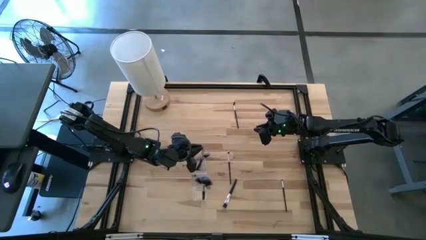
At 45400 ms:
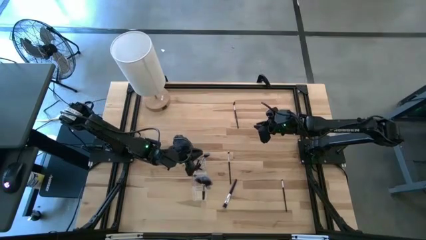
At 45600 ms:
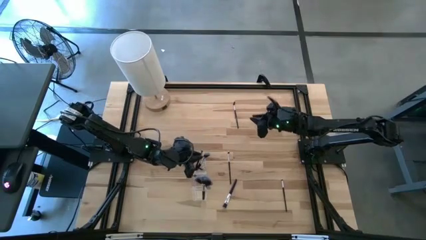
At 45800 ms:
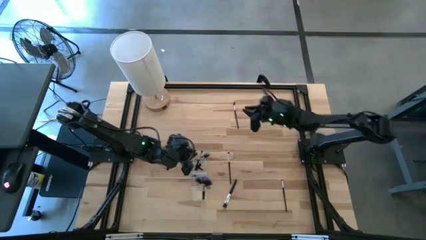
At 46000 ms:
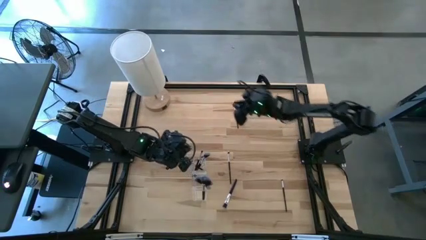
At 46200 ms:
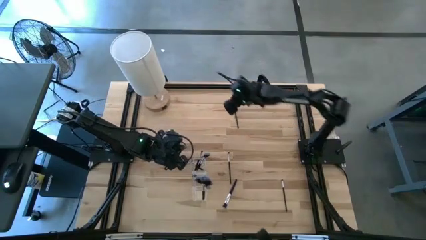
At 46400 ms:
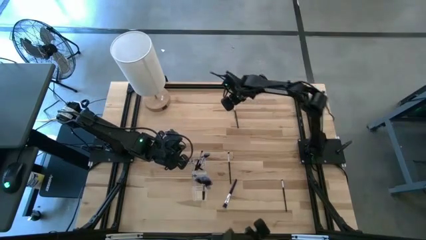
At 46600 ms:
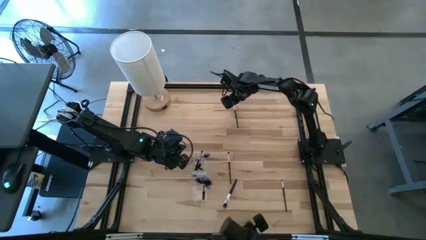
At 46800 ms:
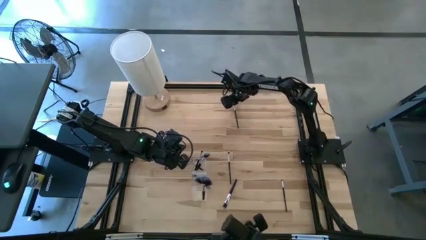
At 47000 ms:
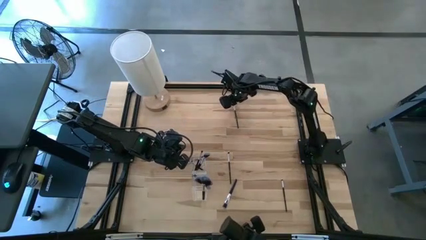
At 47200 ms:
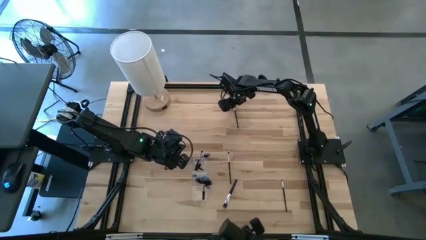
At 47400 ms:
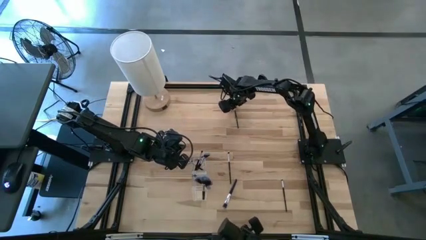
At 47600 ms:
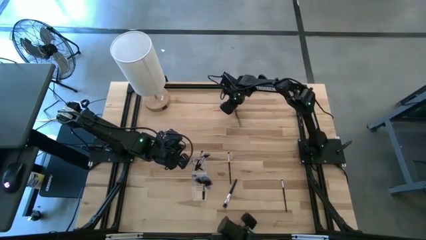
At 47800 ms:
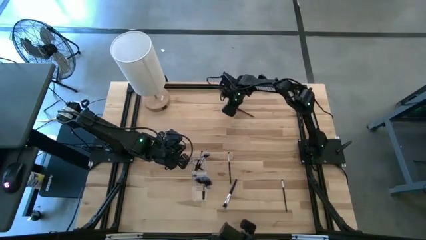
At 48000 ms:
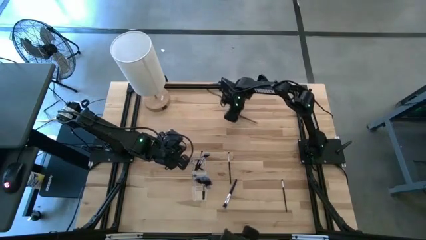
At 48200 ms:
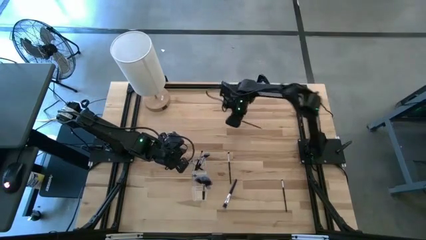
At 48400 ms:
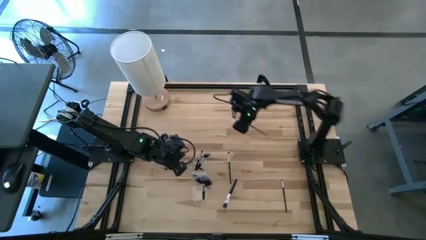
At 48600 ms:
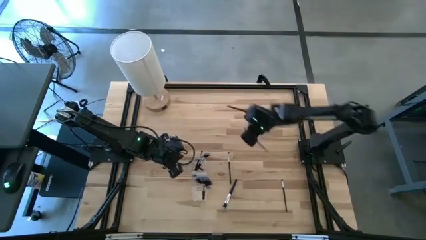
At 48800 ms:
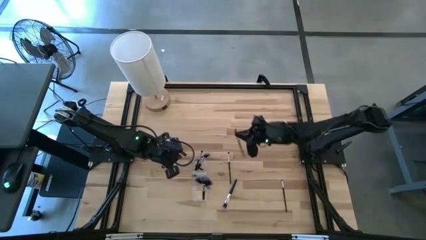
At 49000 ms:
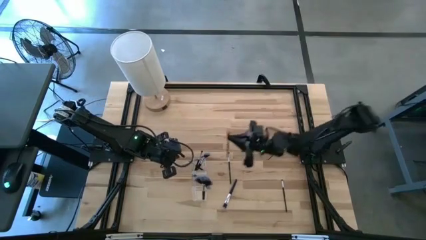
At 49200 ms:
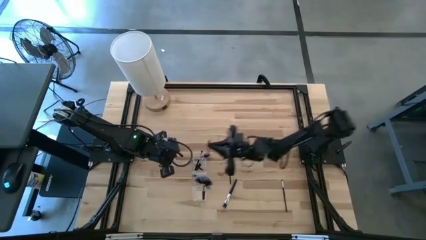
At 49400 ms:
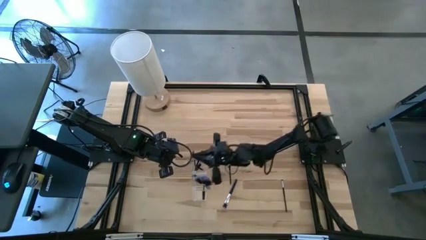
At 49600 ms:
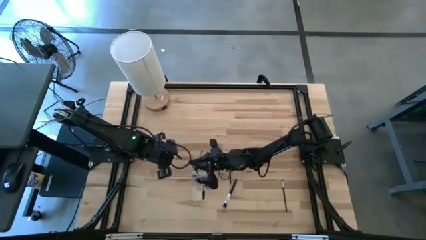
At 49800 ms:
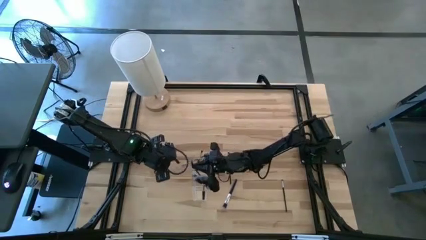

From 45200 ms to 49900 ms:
Task: Put items in baskets/containers
Put the lash brush into the transparent organizer

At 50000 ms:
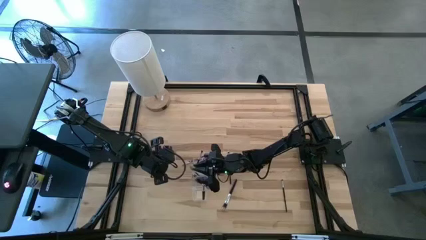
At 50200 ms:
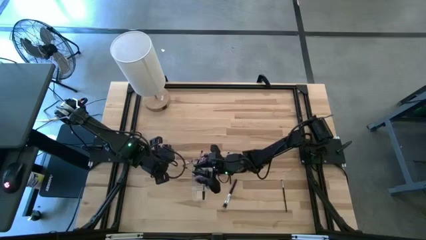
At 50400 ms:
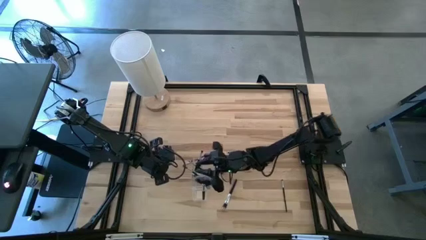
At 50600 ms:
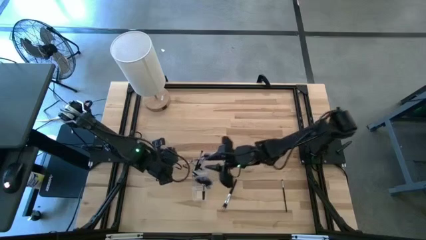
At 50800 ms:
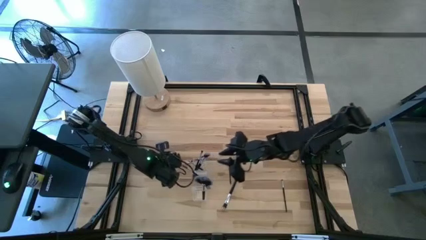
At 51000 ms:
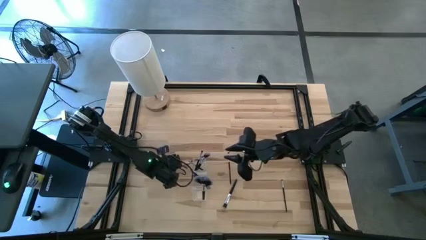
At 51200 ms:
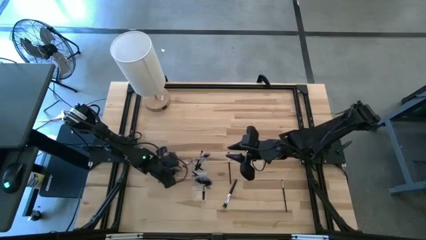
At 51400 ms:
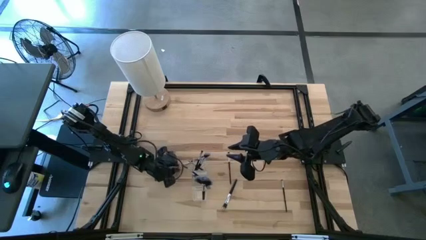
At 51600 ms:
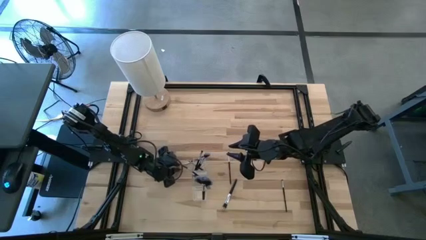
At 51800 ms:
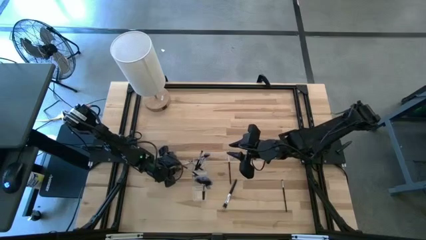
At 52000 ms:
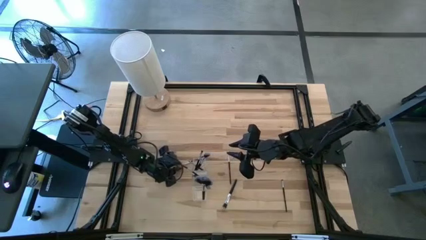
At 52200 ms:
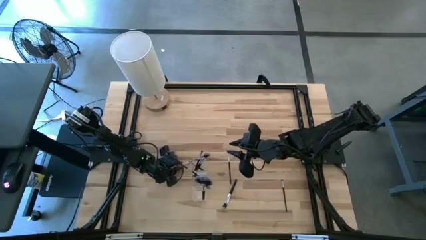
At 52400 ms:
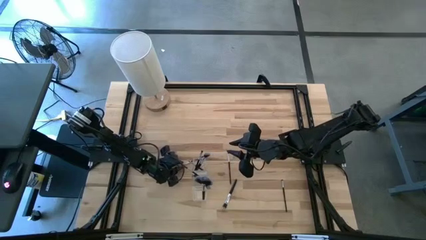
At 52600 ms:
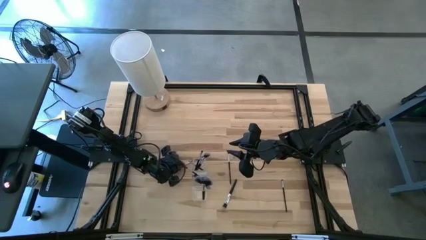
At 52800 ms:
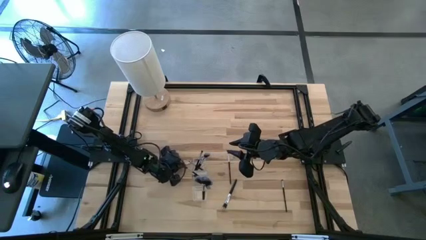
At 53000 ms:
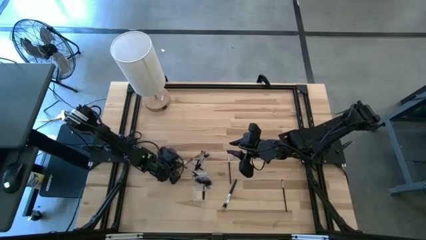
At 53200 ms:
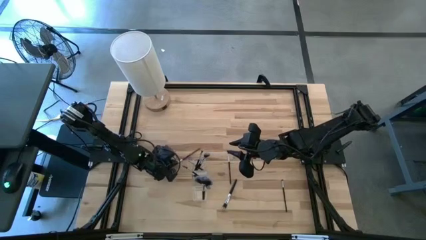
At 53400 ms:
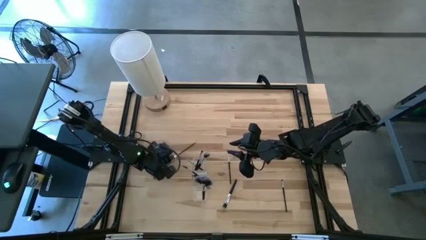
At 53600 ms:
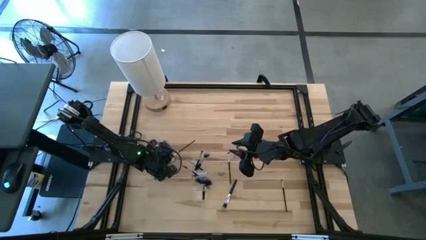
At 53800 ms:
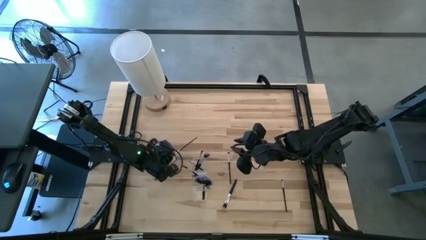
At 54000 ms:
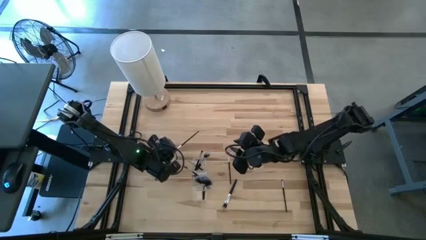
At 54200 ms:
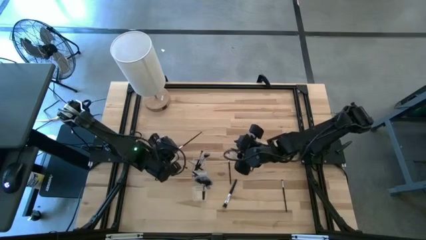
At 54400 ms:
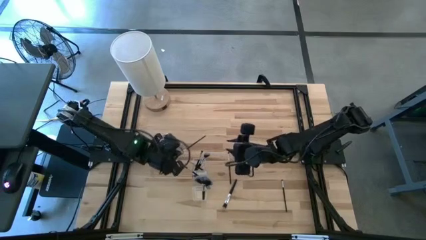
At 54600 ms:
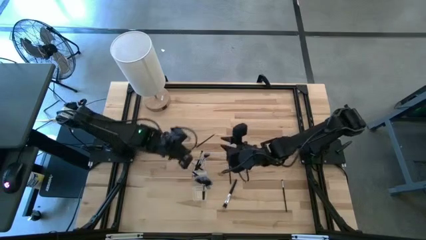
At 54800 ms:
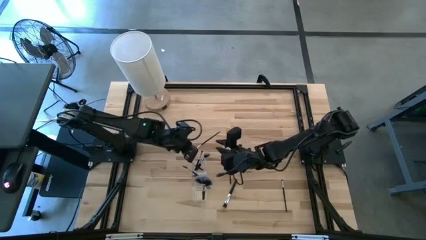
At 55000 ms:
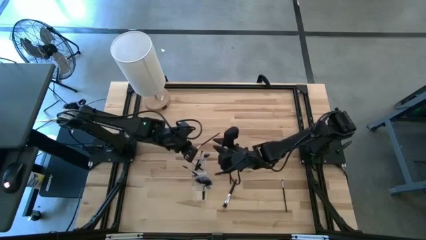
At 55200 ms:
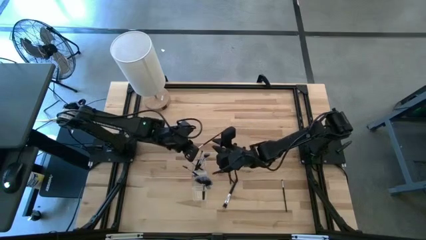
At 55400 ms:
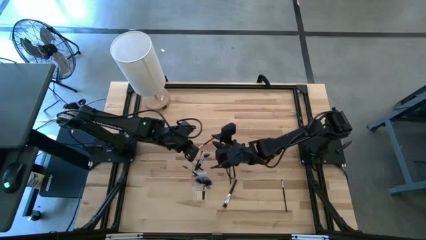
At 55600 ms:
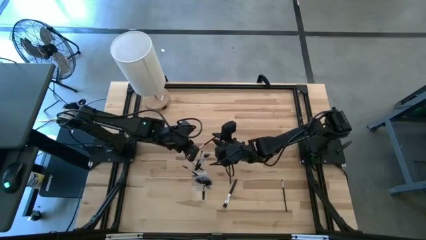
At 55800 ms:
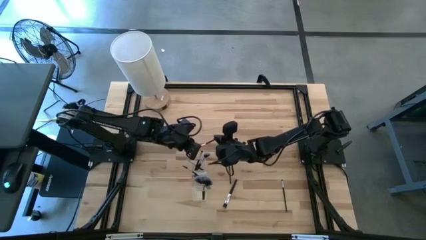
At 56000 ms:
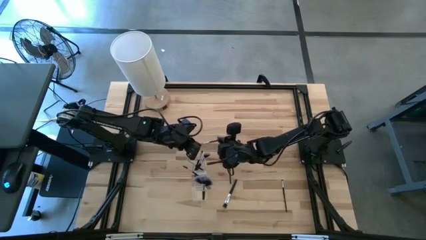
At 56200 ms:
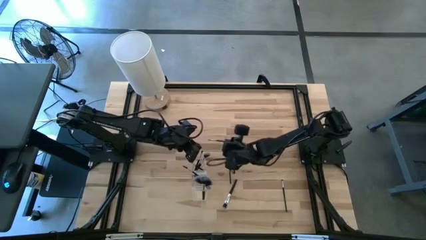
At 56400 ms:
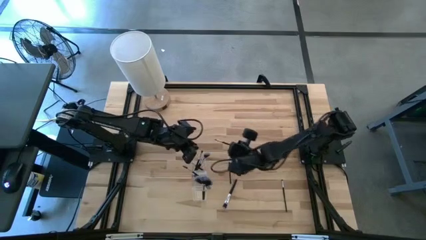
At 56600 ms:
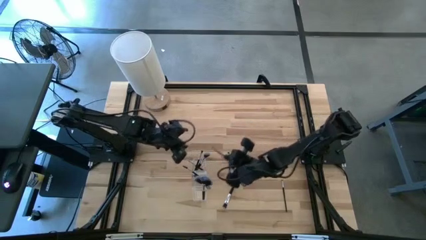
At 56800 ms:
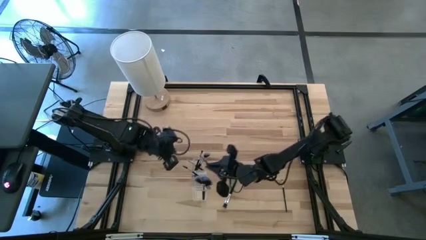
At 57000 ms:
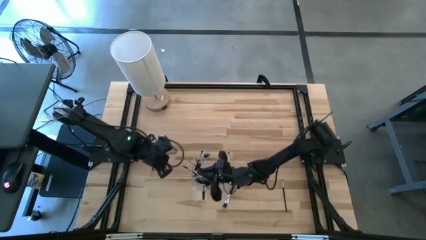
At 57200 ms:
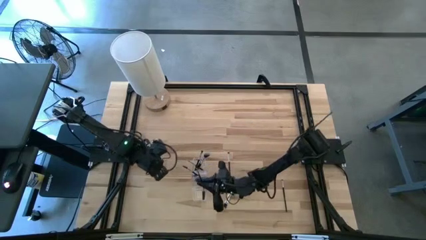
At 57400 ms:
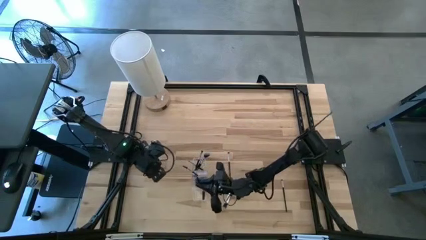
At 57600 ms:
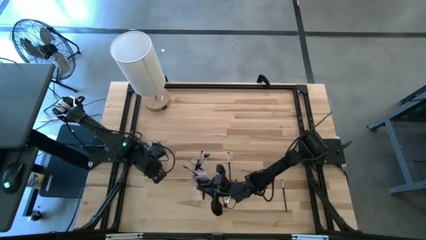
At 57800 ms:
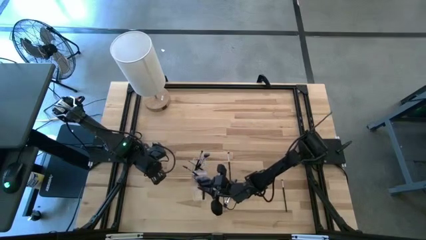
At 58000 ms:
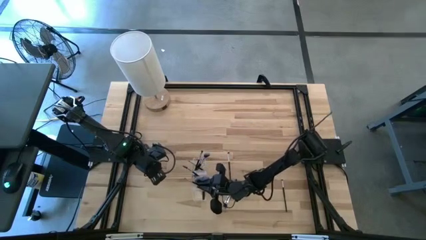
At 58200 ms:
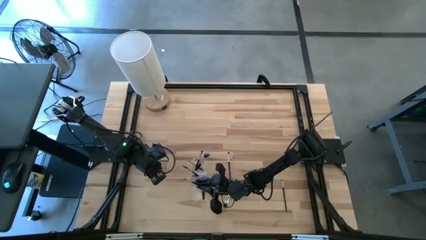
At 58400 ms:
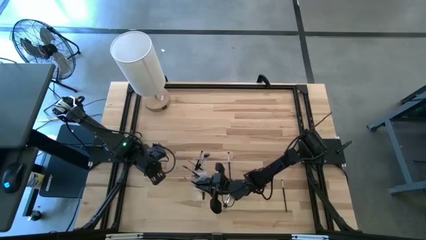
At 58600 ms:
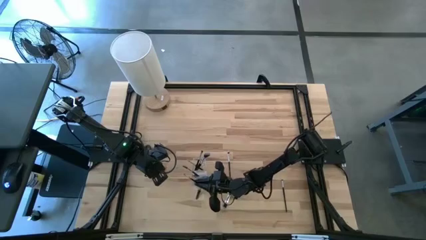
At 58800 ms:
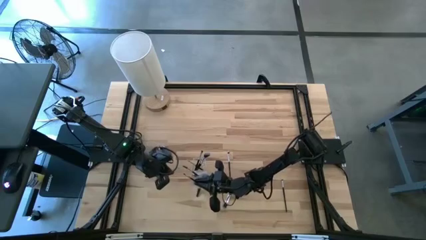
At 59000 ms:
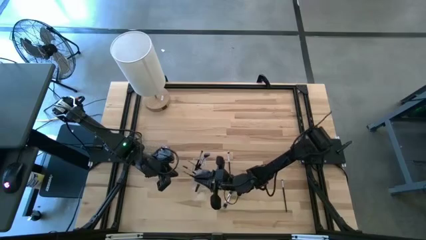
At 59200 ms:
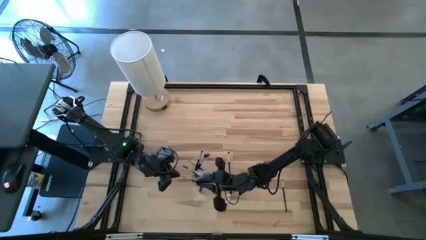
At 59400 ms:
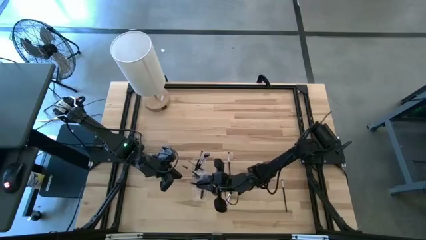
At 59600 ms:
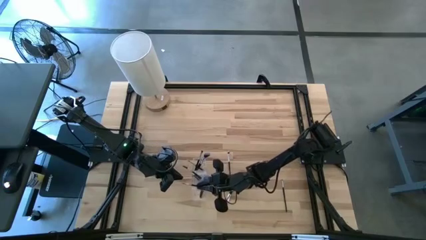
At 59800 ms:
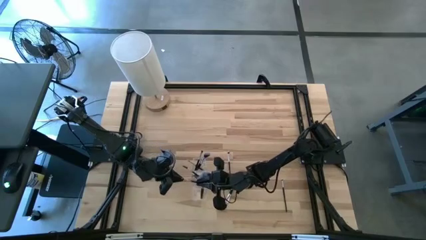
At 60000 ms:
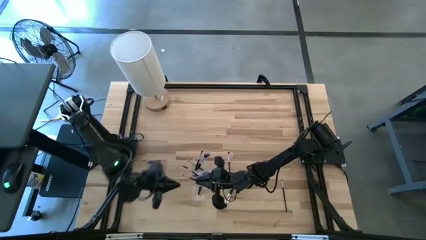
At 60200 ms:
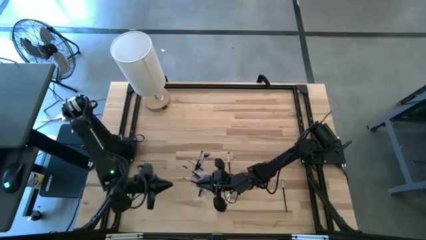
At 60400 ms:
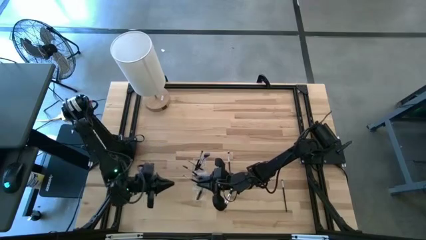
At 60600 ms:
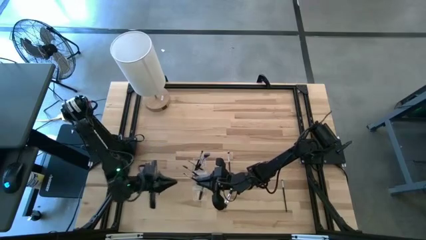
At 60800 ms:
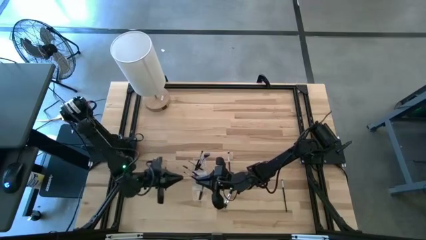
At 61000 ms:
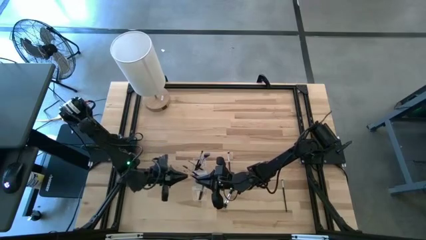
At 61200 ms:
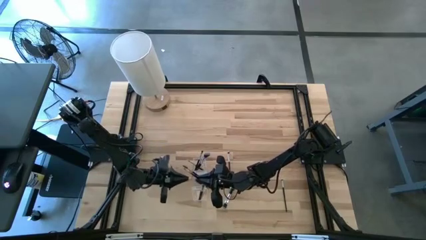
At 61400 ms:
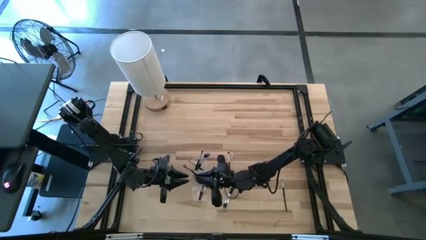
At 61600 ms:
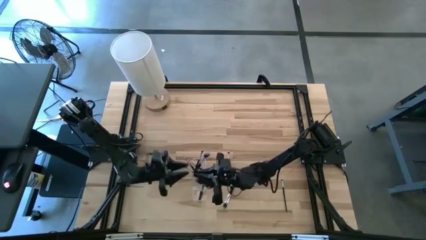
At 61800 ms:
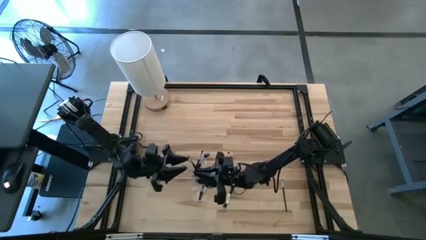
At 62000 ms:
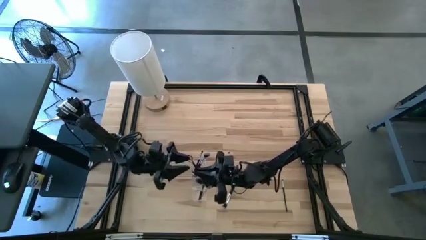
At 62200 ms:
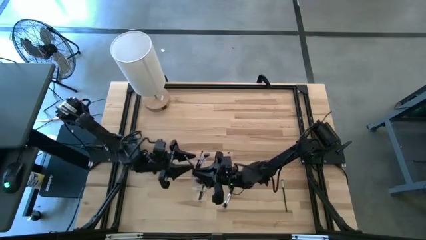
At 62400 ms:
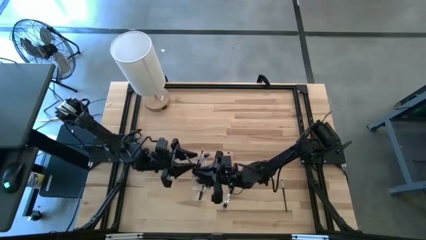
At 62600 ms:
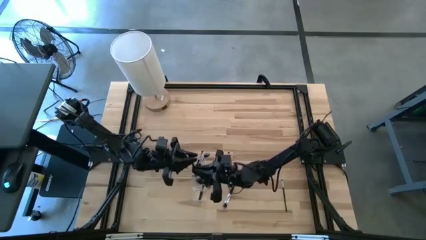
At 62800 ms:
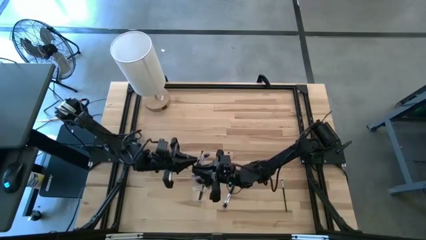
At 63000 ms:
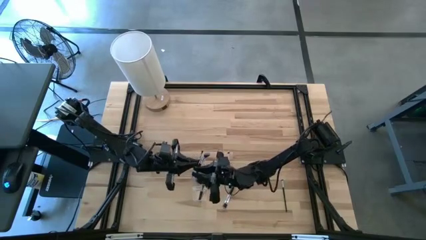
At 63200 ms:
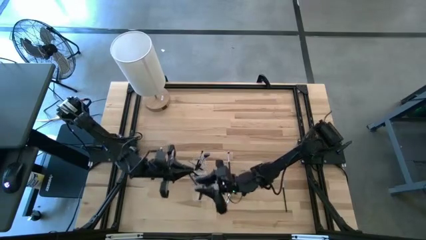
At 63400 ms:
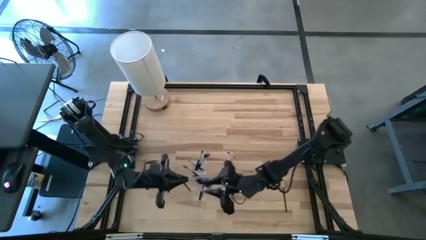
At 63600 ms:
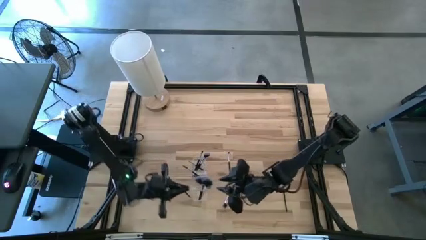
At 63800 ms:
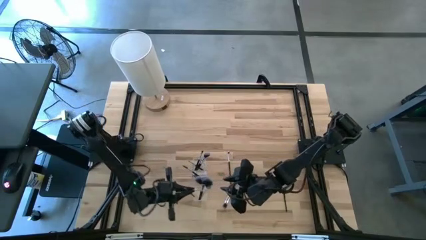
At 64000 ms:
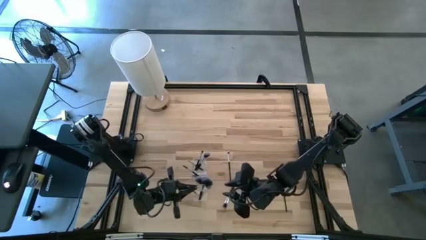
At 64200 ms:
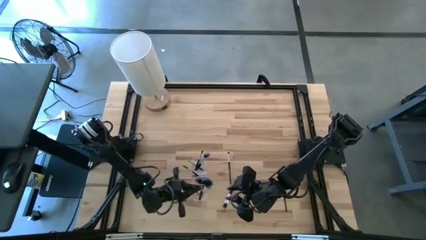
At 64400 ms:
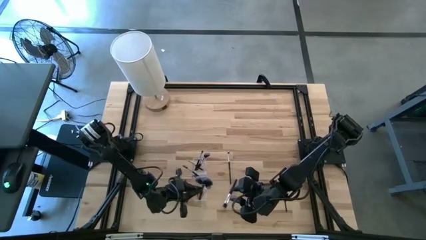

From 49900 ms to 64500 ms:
Put the foundation brush into the transparent organizer
